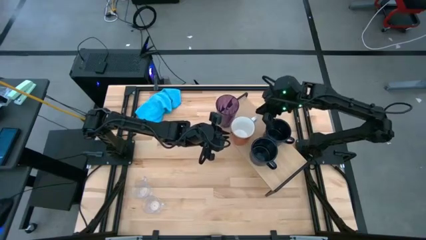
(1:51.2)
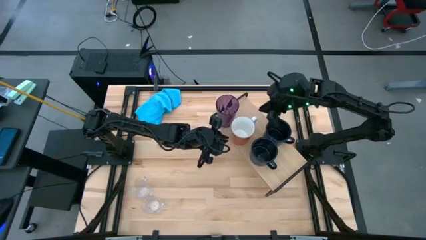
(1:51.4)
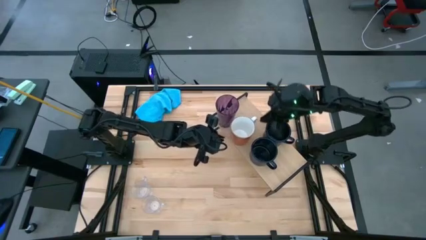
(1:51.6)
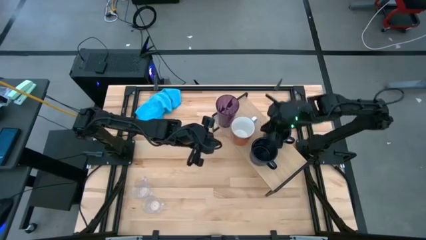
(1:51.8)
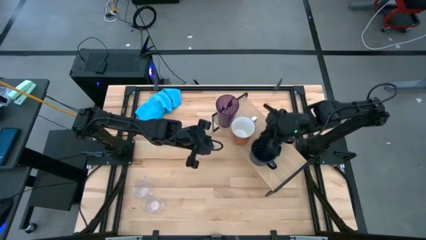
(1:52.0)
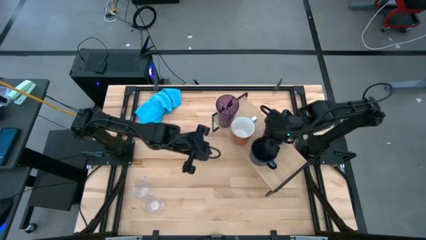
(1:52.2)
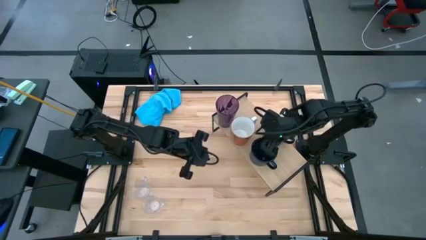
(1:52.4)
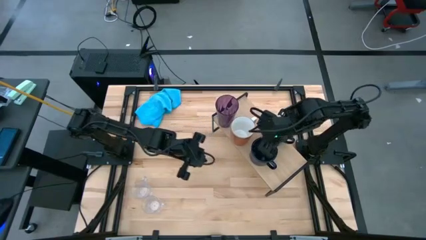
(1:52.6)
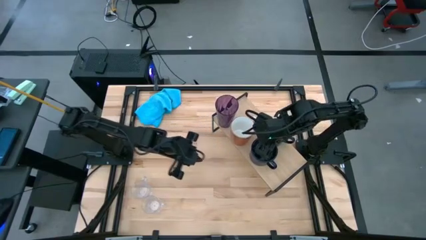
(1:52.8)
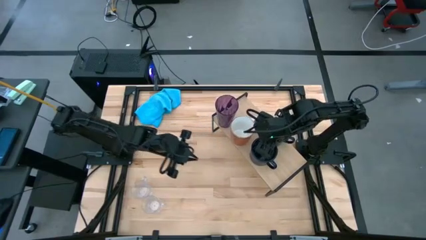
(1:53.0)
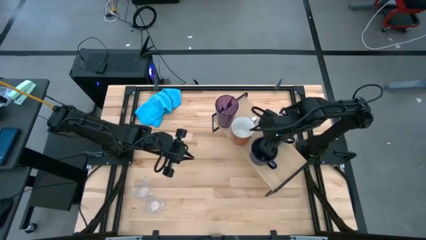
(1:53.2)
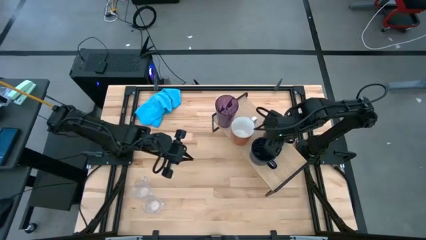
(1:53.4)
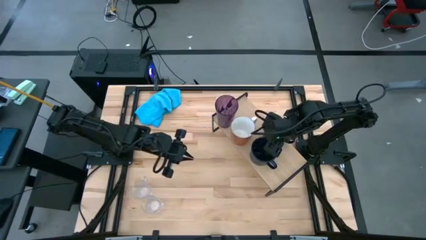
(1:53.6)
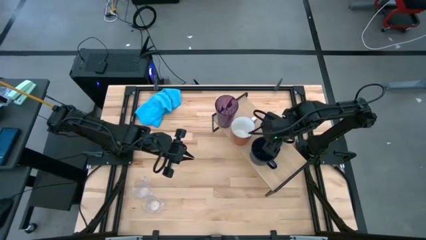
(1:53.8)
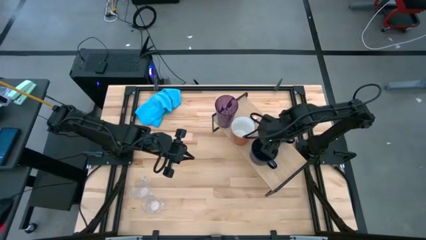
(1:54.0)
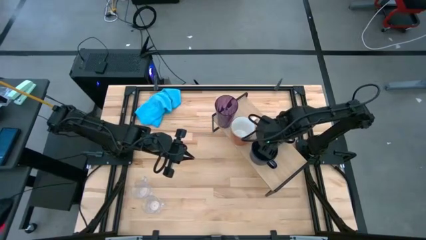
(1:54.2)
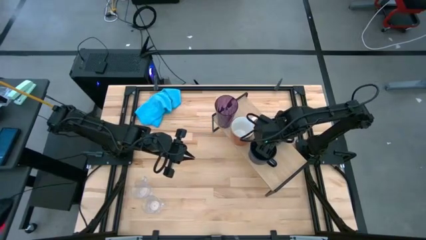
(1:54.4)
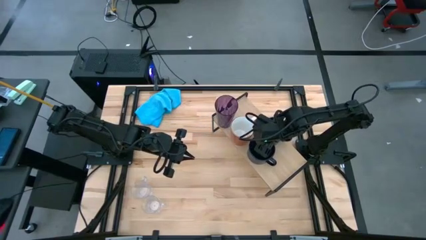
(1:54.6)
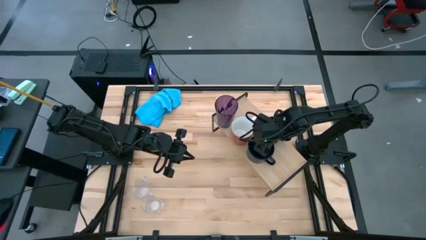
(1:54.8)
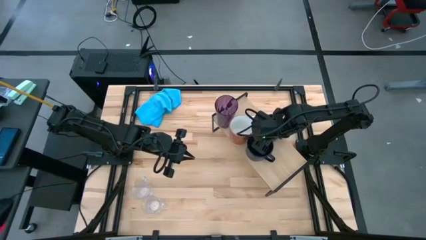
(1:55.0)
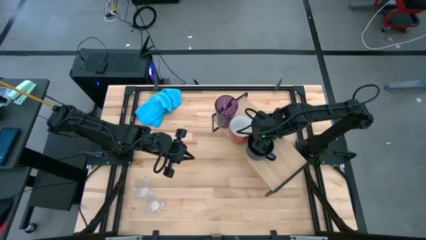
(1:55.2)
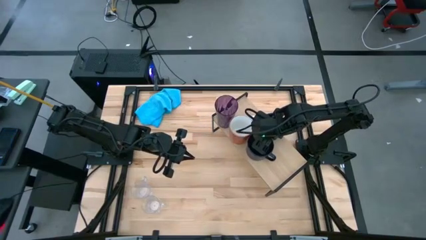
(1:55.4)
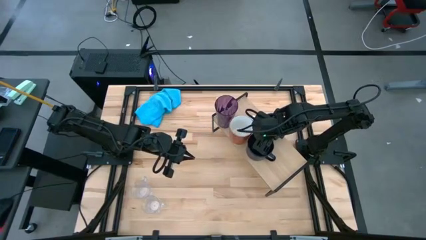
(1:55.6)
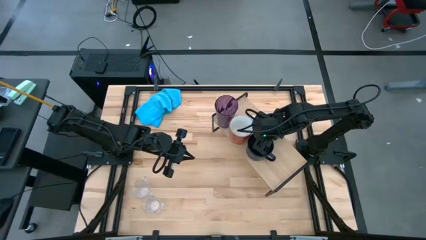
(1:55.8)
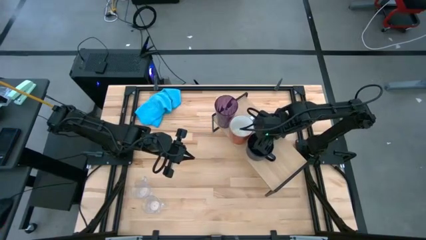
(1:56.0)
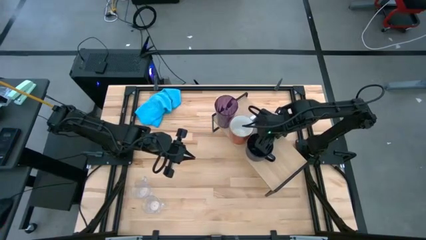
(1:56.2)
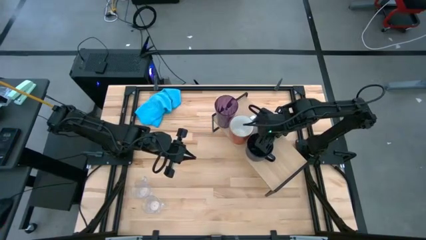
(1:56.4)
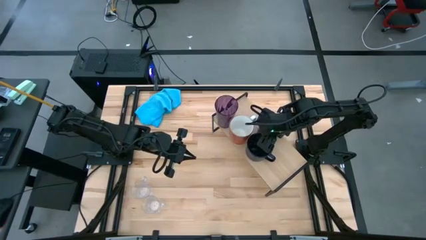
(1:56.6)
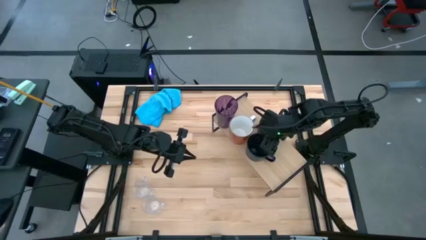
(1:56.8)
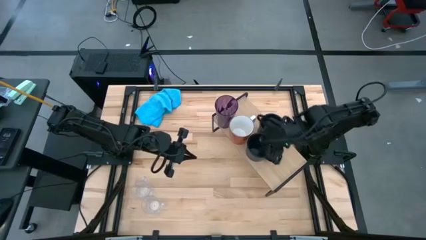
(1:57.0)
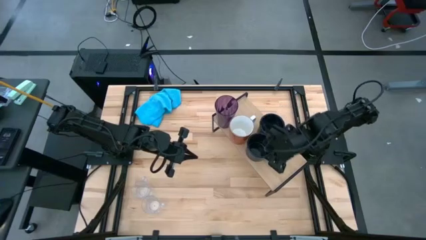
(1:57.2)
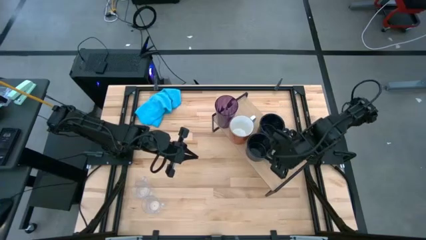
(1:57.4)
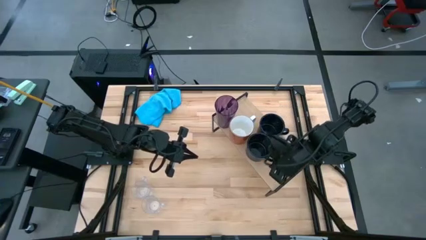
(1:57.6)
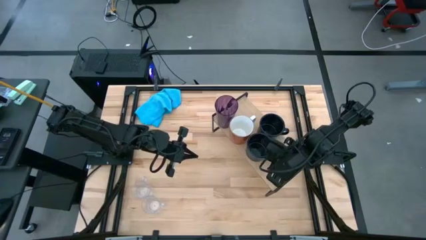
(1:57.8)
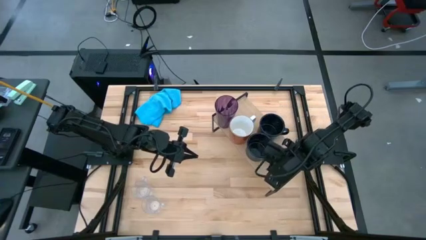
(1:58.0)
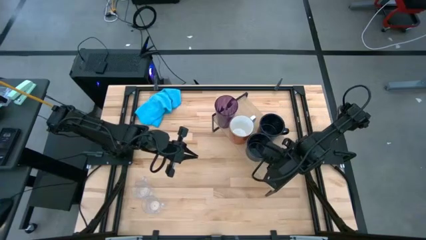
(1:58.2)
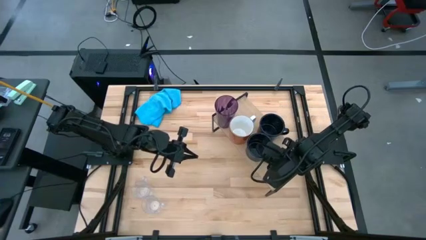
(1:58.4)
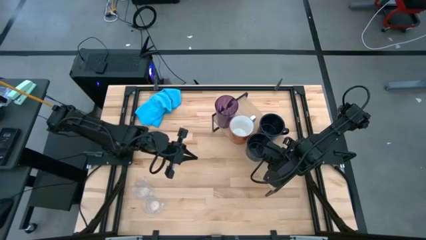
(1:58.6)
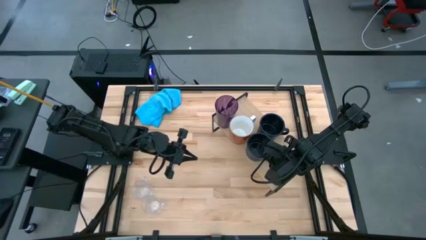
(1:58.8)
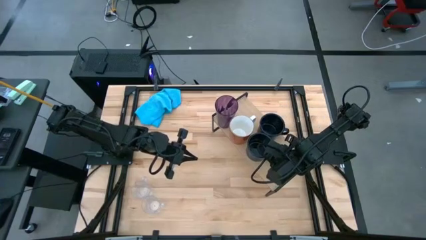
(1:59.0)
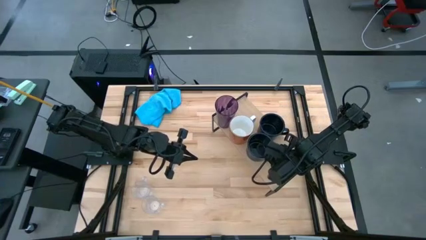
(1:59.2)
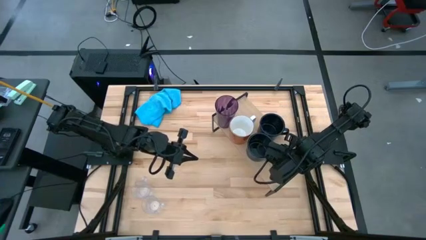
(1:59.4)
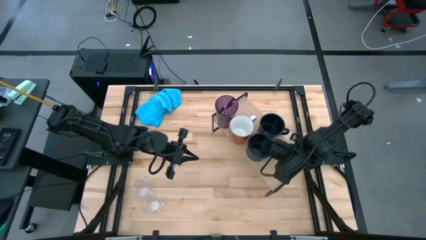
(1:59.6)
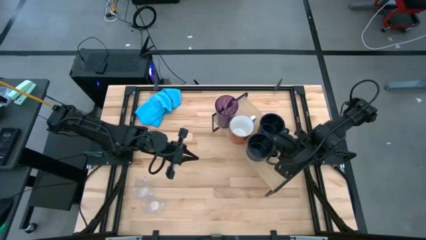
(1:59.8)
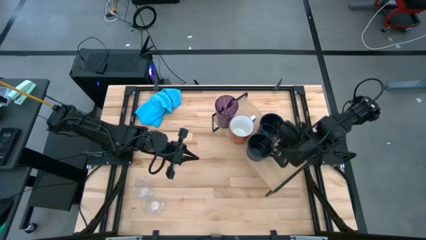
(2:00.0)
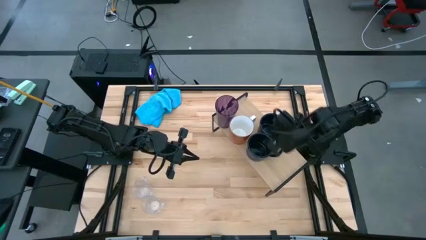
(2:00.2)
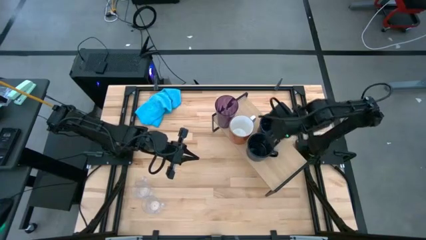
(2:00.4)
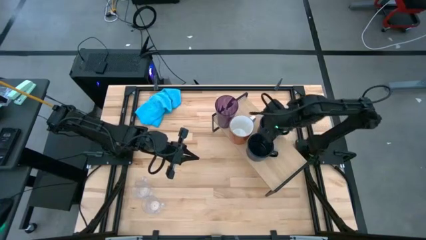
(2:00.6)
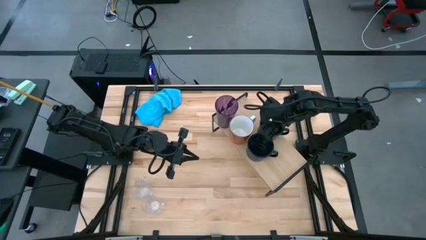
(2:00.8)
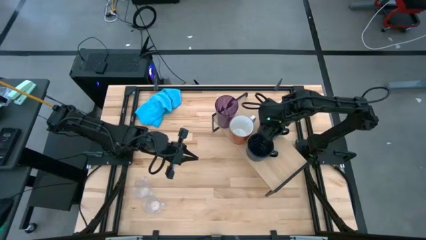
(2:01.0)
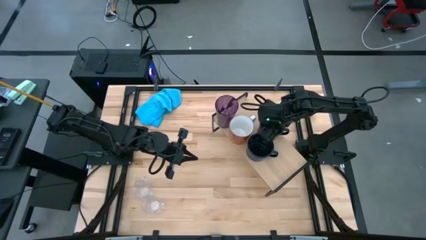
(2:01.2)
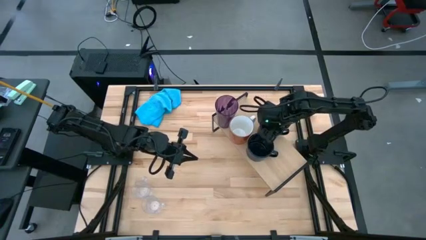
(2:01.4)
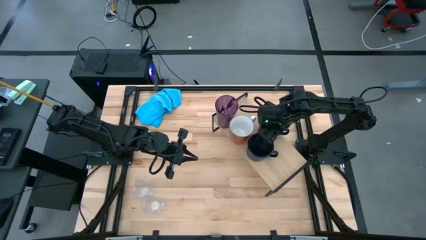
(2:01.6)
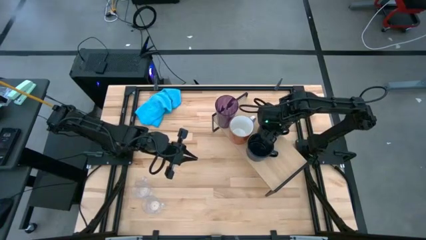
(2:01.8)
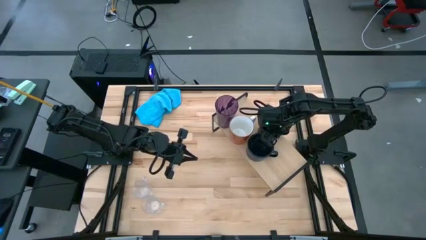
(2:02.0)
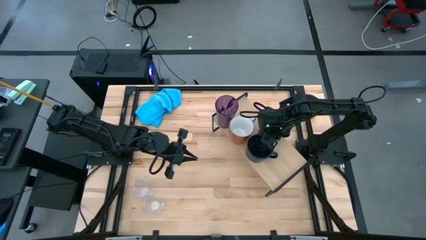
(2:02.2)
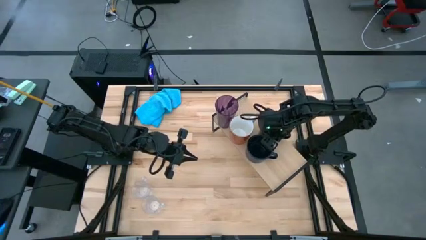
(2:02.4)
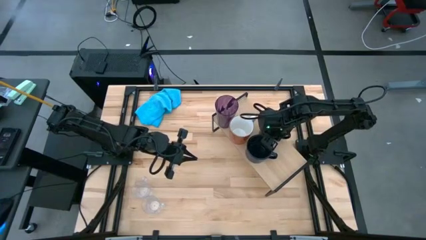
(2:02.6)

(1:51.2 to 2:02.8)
Task: Stack small to large cups/mugs on shelf
Adjust the black mugs on the shelf

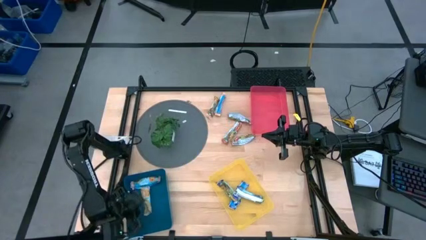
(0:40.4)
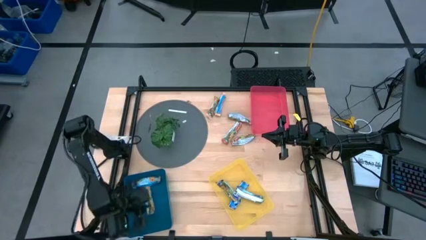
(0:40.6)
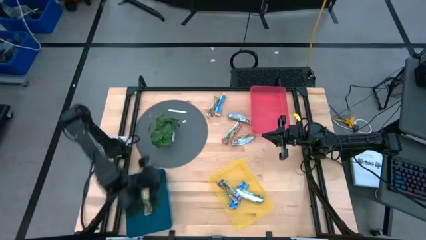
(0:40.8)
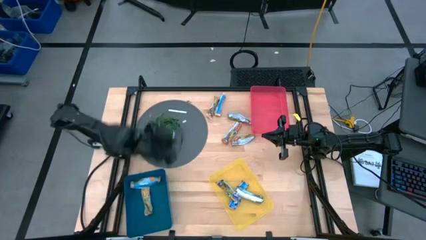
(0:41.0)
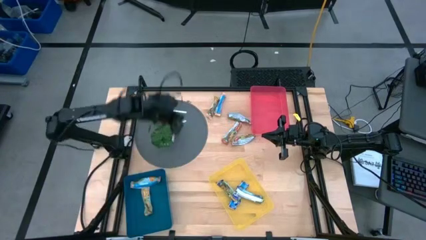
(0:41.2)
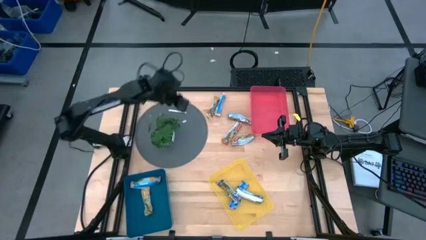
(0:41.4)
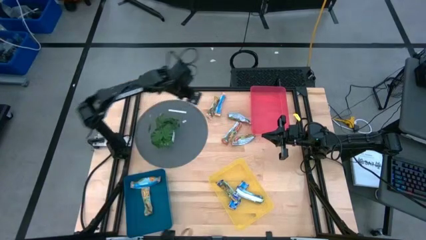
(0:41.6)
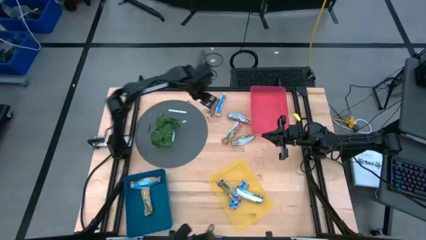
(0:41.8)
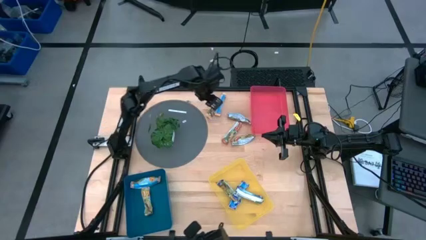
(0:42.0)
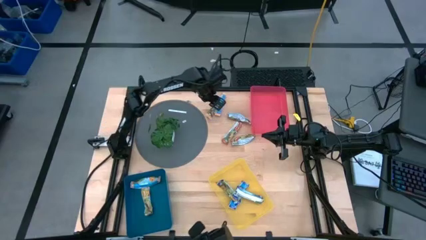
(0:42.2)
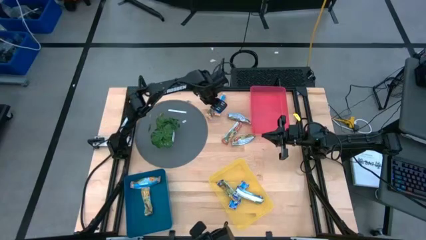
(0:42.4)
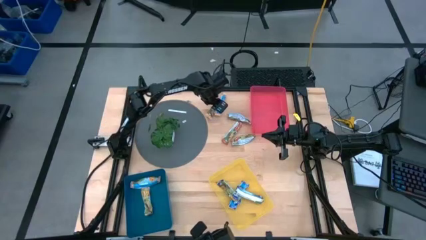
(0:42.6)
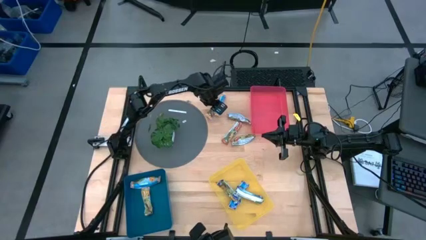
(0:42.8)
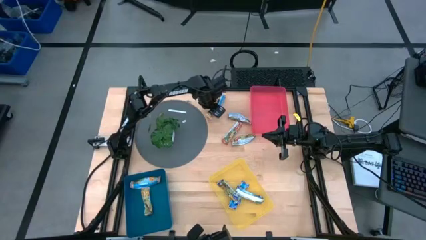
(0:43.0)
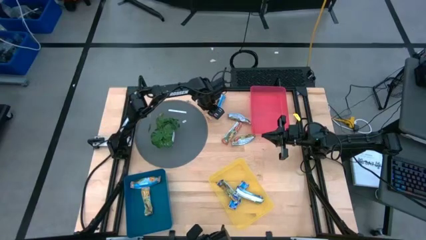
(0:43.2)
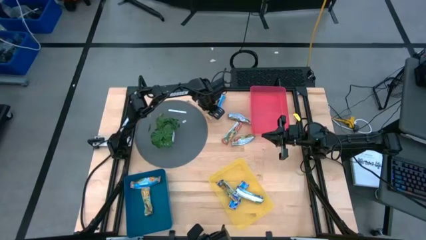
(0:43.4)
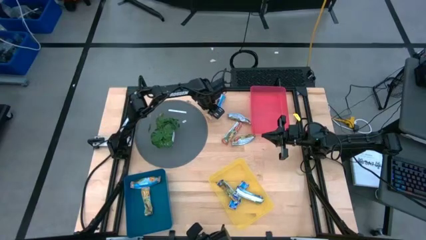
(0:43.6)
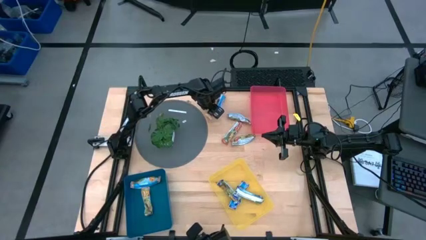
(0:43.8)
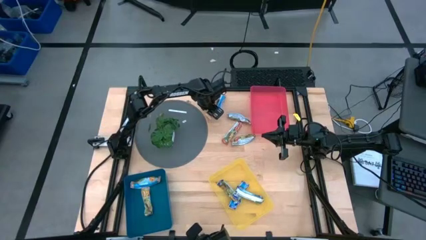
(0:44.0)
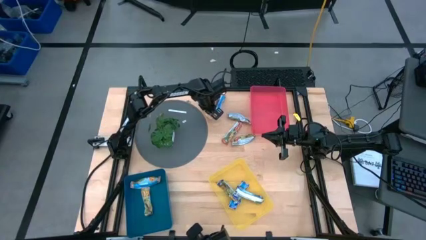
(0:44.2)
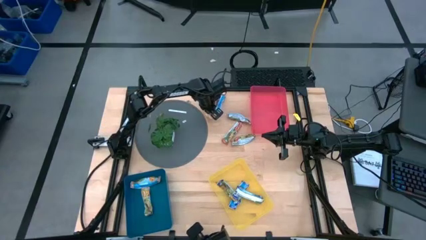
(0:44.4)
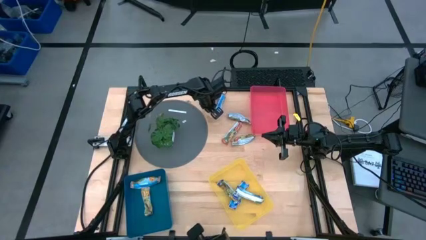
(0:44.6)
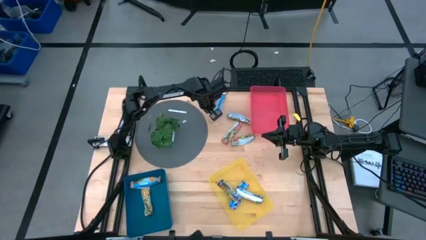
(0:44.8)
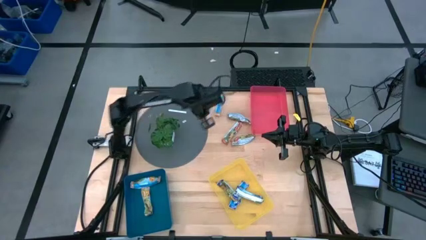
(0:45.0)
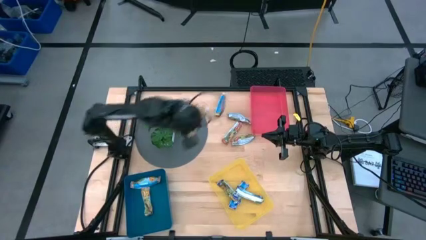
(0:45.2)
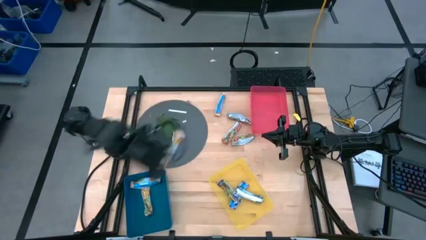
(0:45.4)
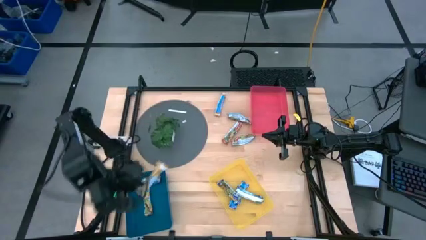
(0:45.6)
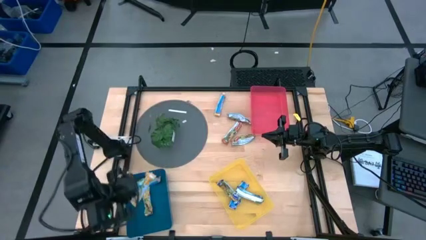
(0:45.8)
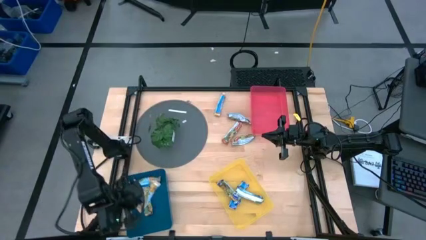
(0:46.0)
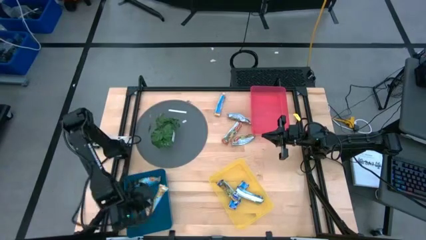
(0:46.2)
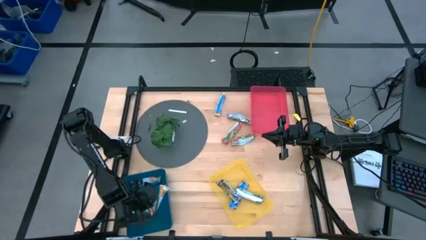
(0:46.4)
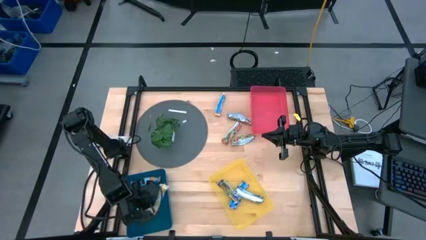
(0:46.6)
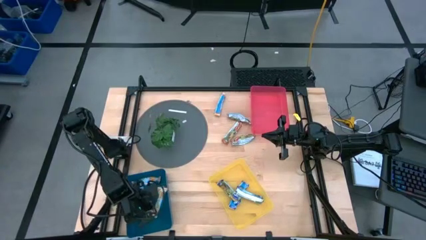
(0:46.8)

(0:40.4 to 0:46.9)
Task: Pick and place Granola Bars by type
Put the yellow snack into the blue bin
